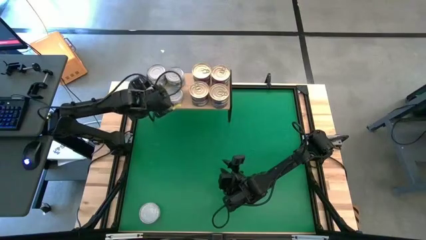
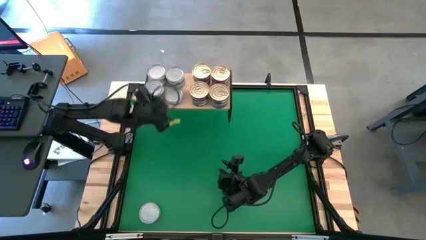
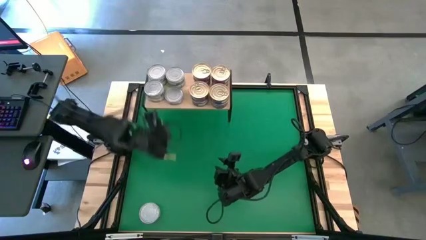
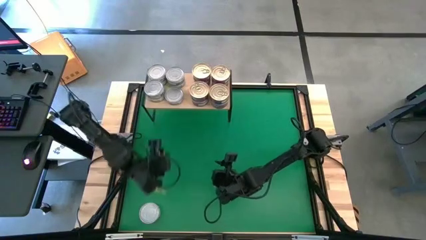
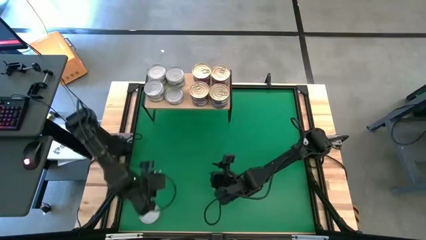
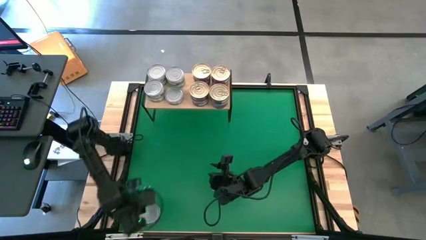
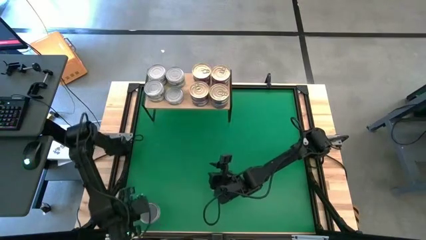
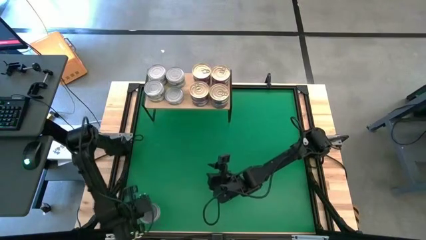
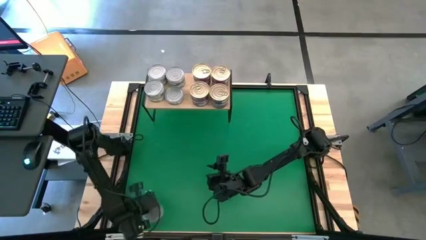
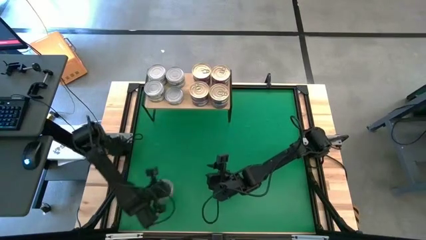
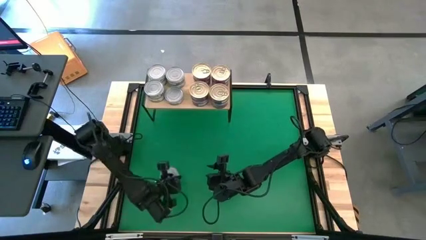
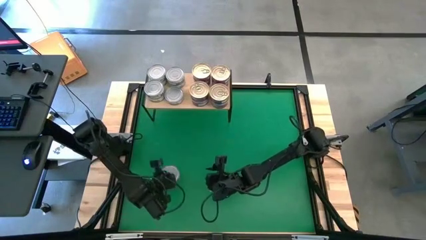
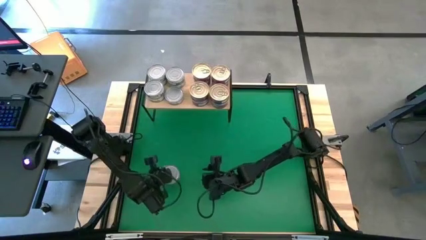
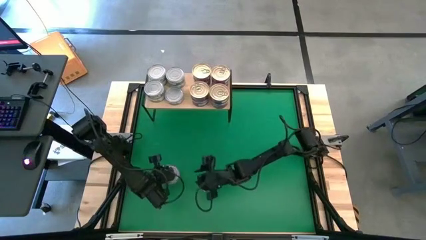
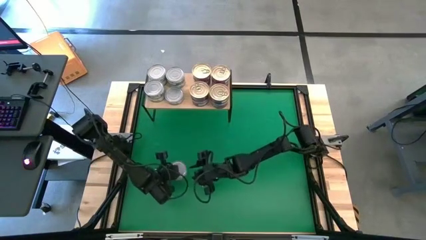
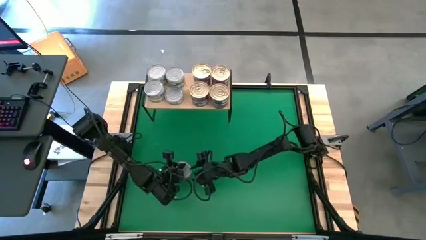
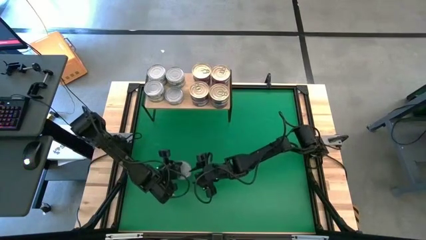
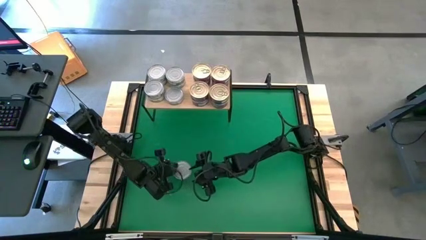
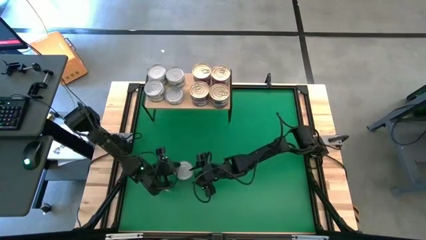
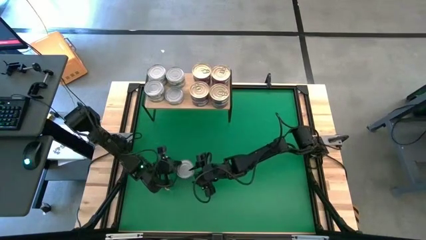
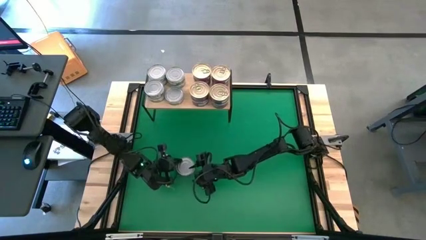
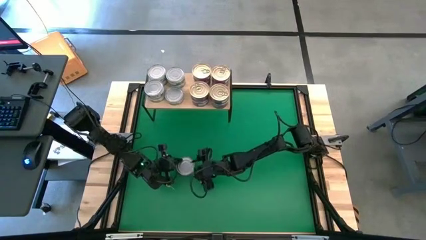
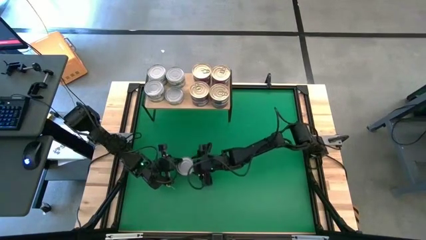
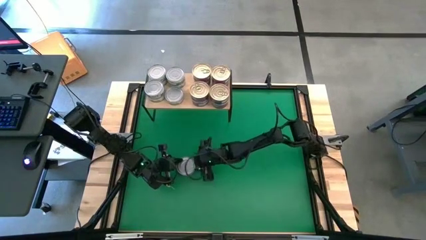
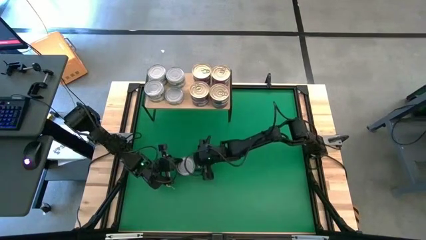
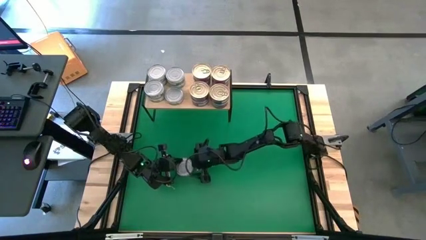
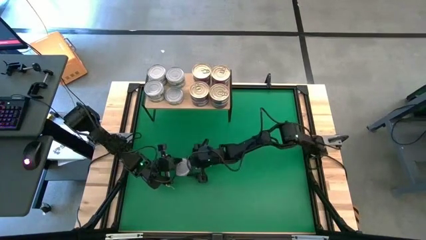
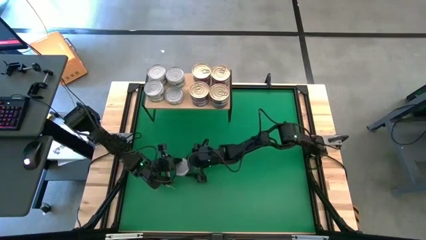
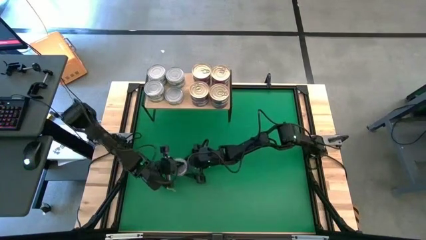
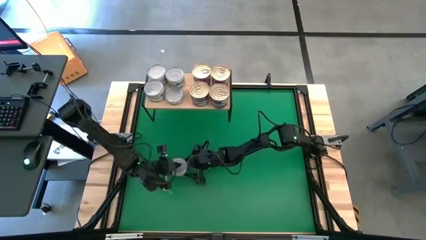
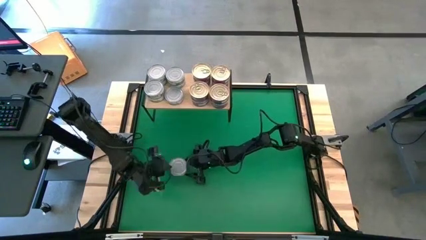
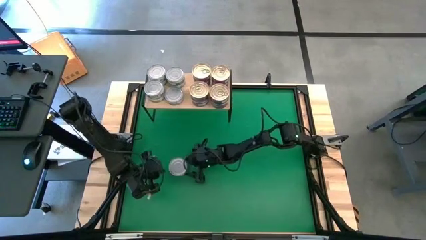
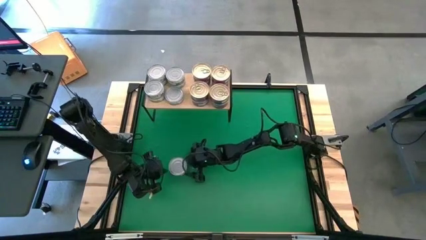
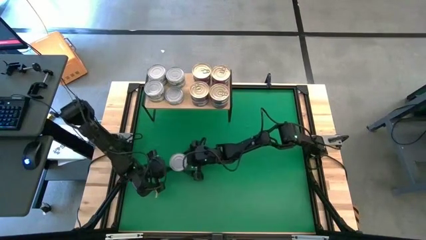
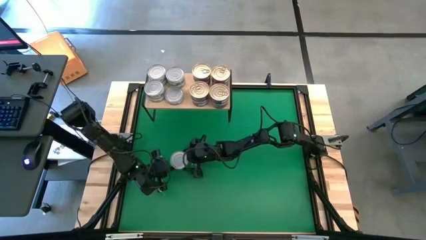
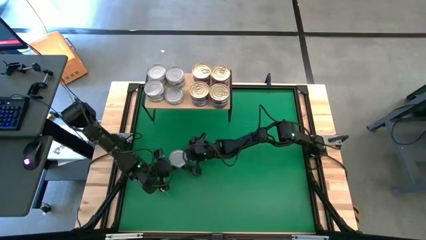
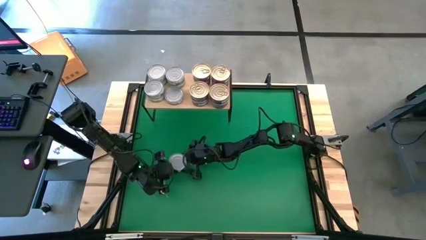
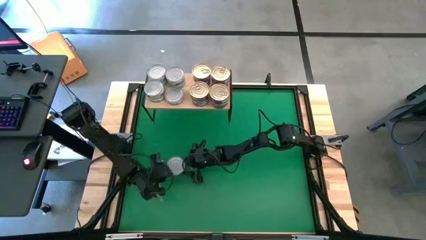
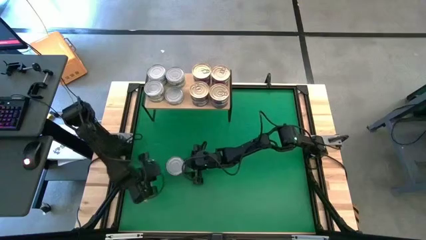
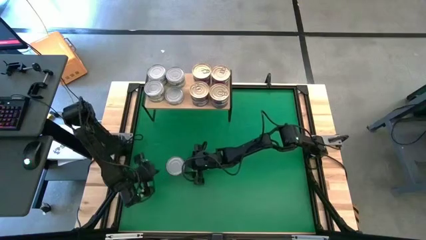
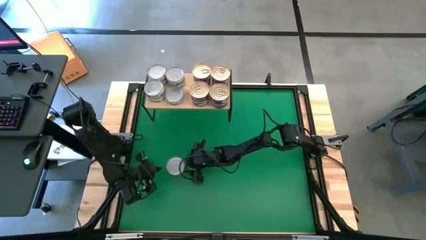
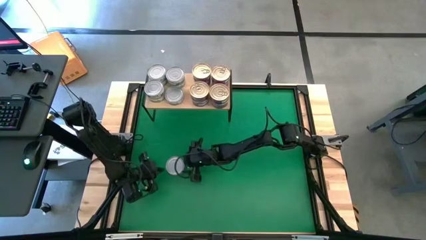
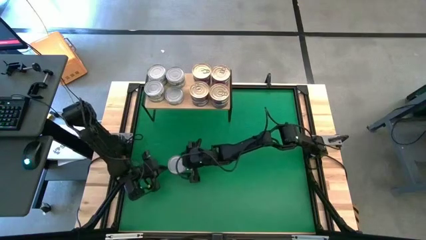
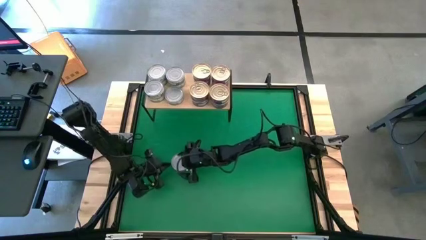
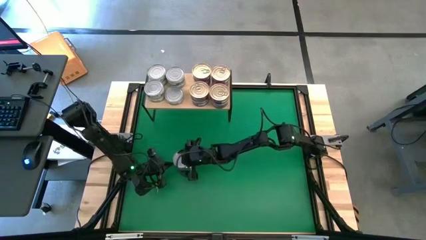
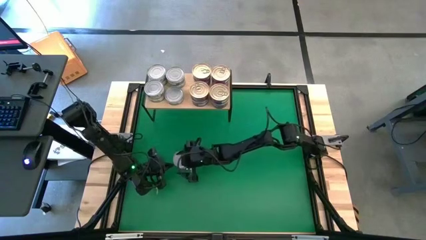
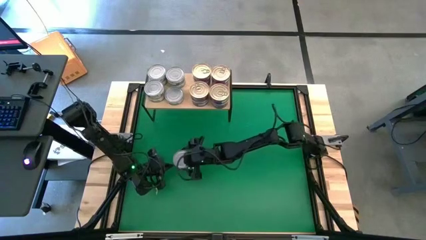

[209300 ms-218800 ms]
Task: Stack canned seafood by type on shelf
Stack the green tuna can on the other green tuna can on the shelf

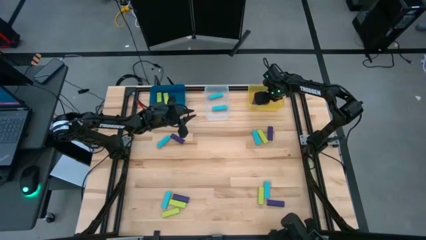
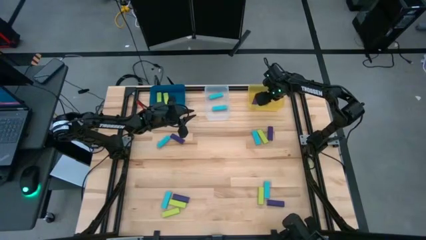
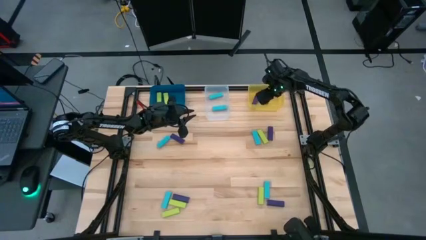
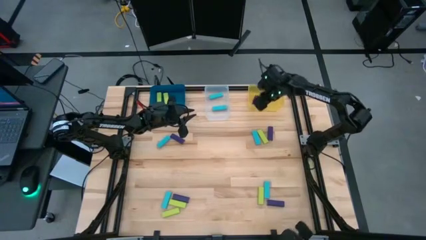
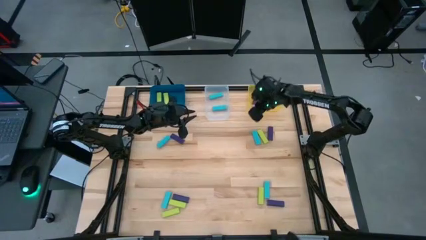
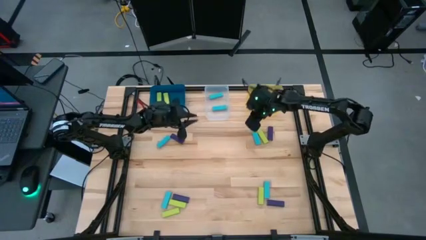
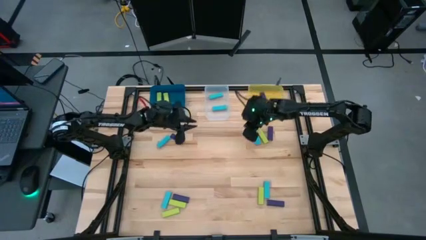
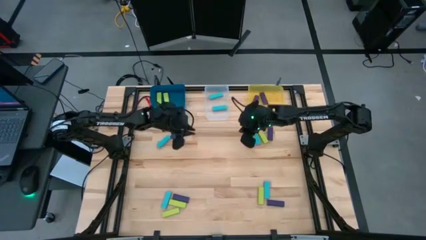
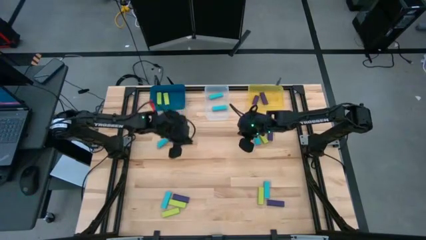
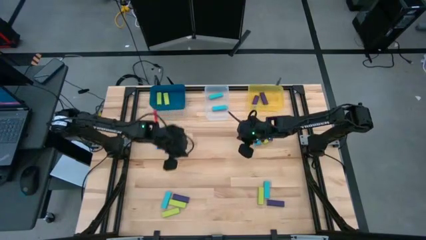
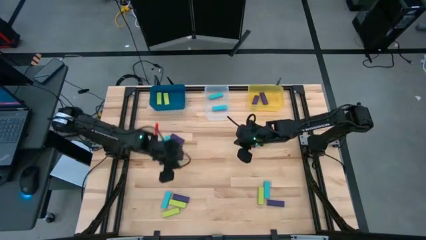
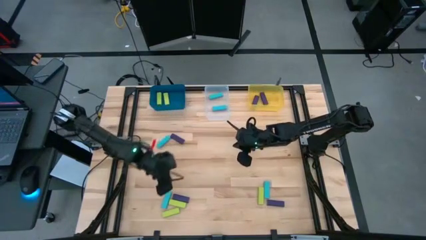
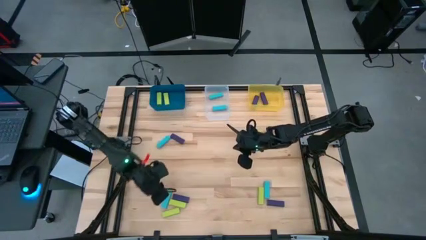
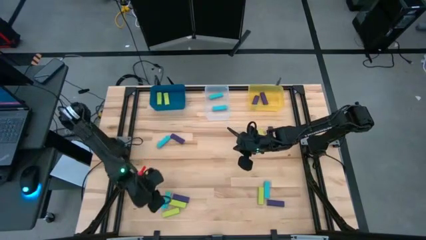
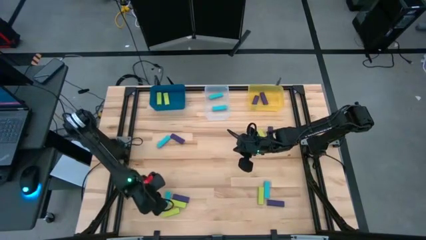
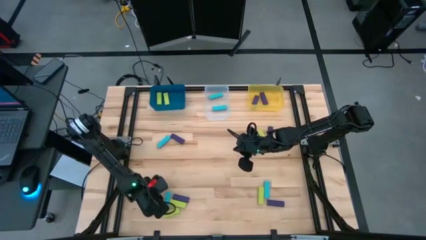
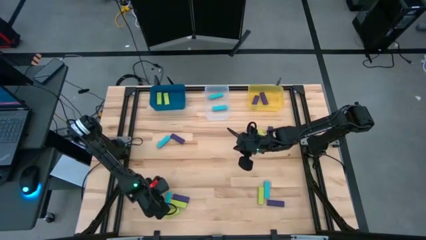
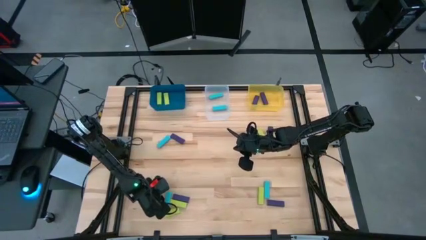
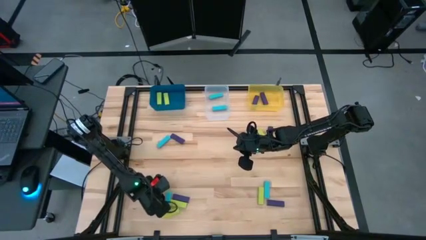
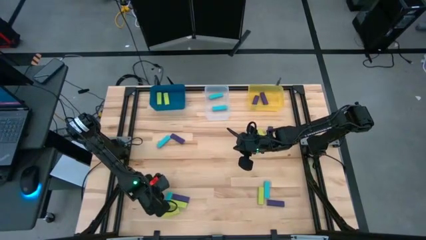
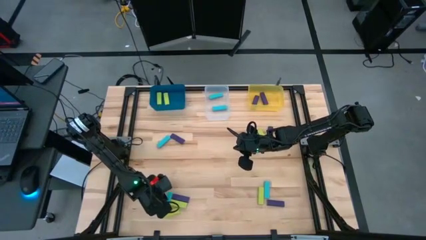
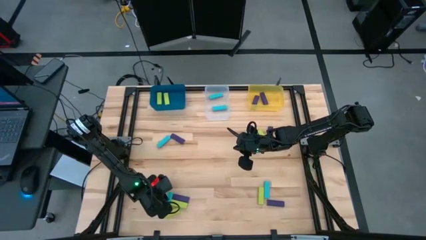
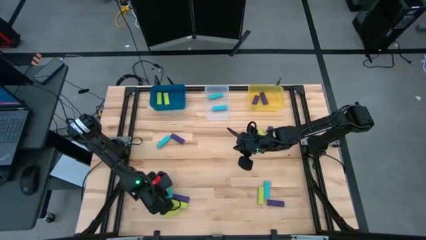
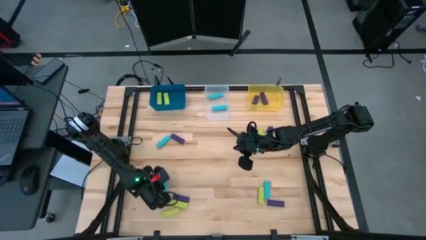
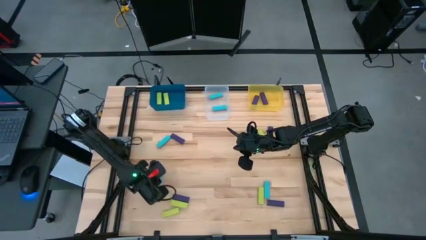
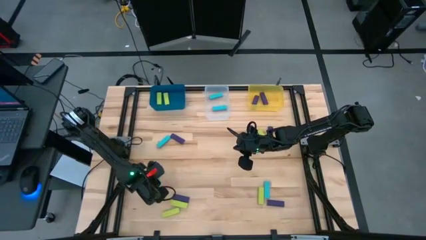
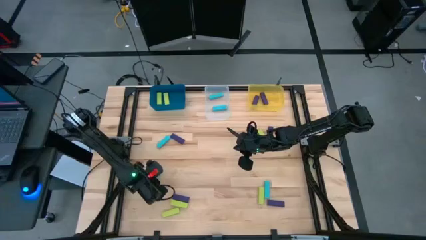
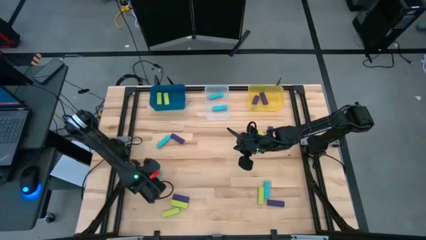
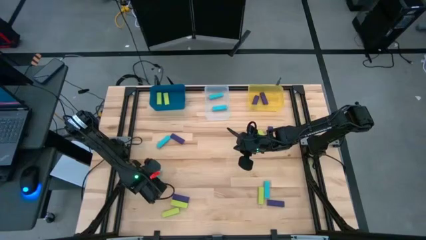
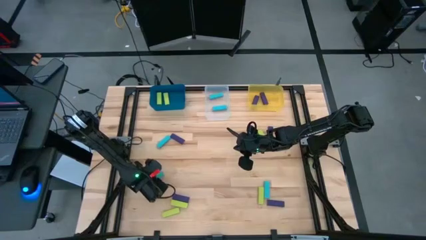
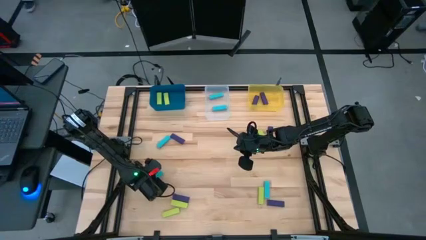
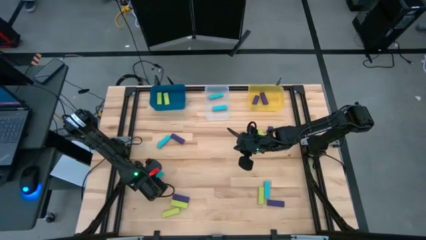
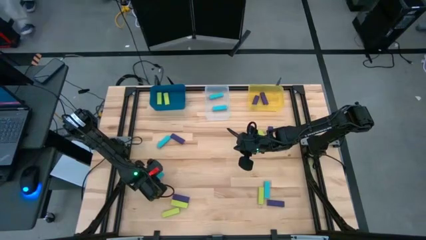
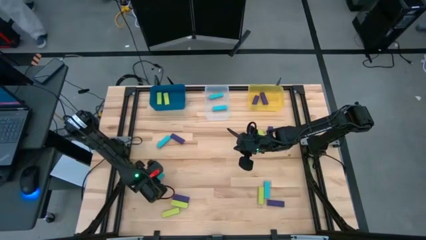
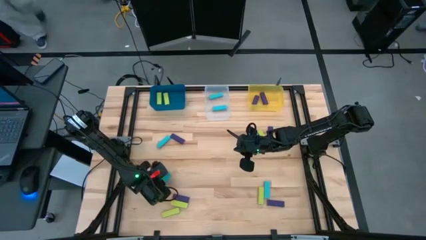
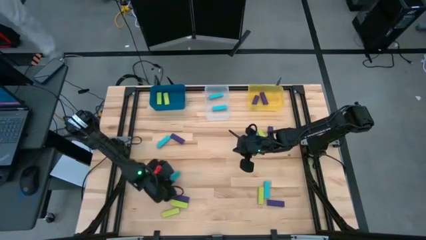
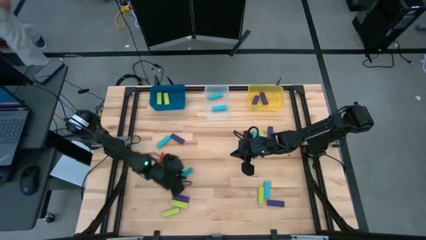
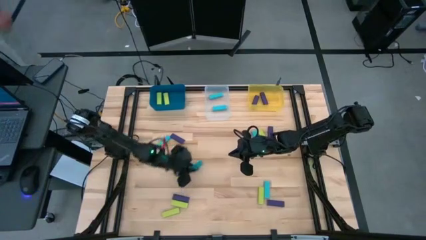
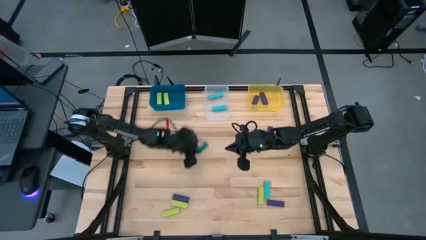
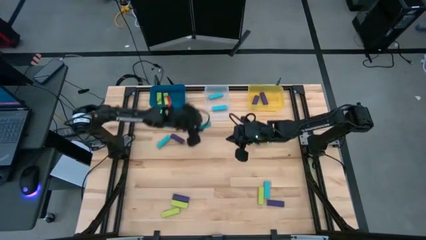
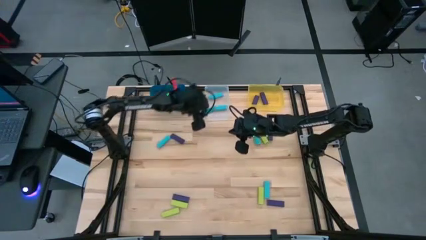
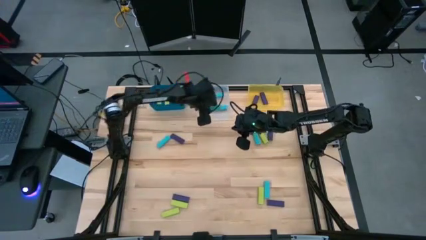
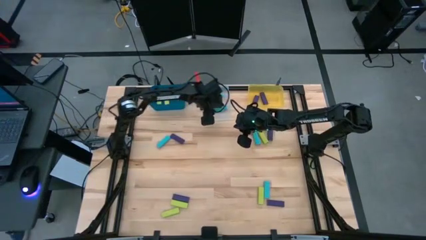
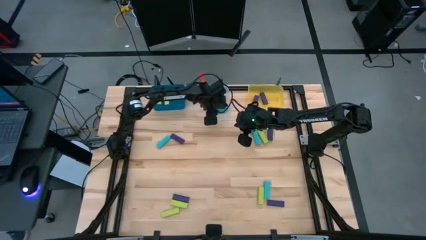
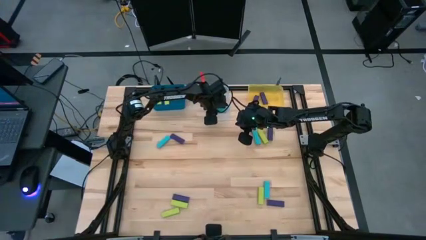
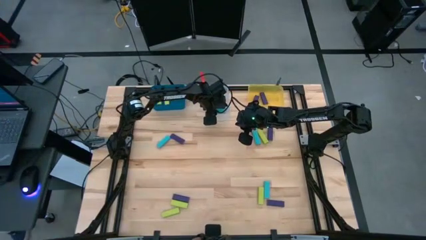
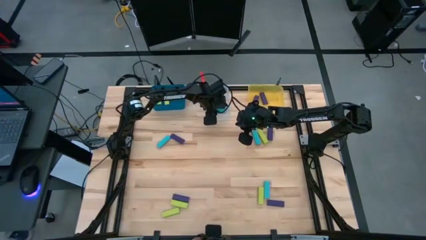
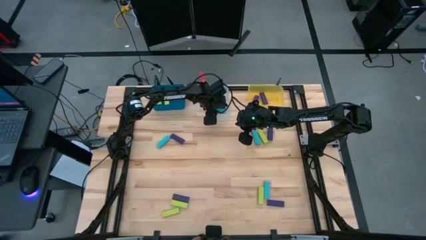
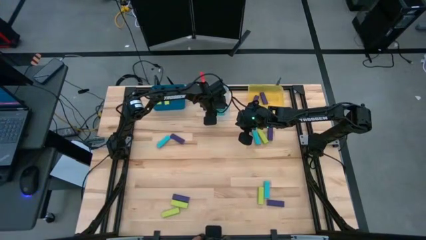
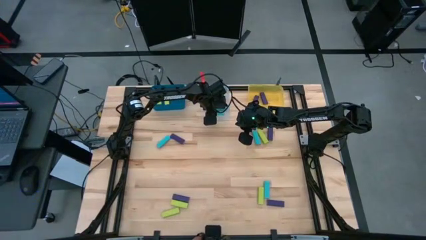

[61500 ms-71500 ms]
Task: Sort blocks
Put the blue block into the transparent bin
